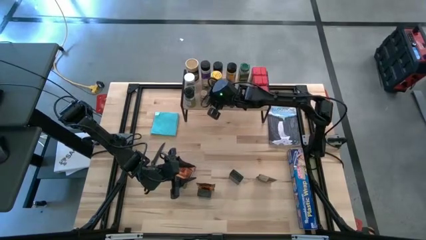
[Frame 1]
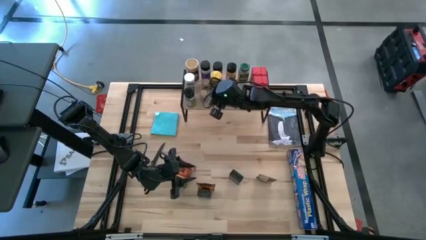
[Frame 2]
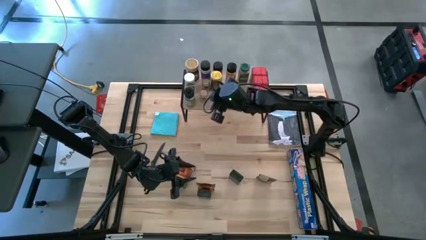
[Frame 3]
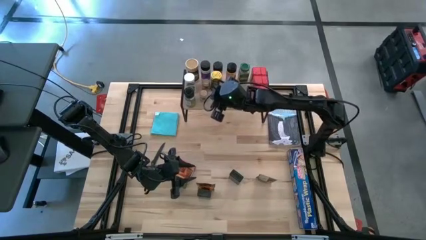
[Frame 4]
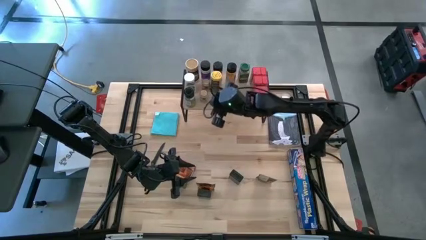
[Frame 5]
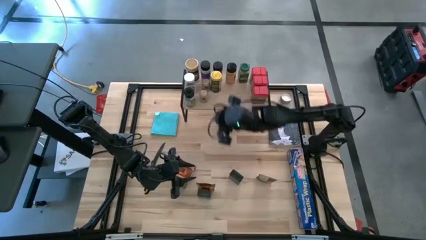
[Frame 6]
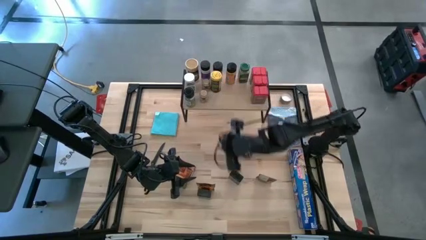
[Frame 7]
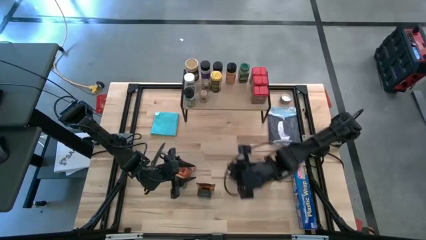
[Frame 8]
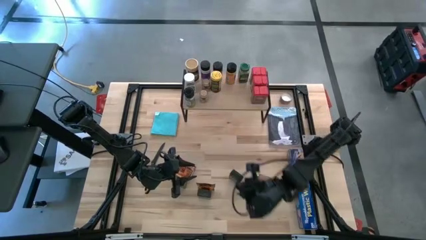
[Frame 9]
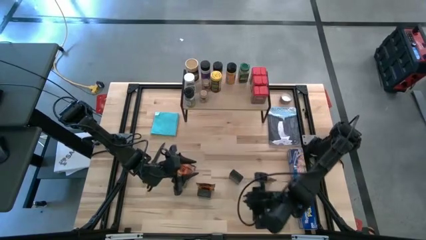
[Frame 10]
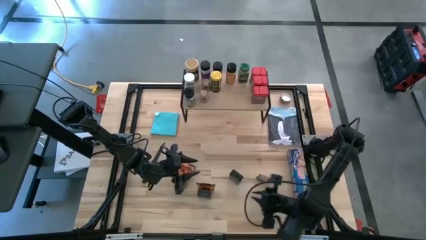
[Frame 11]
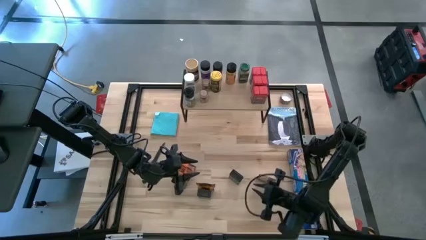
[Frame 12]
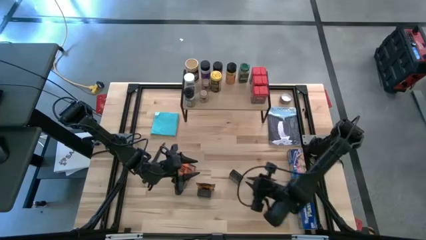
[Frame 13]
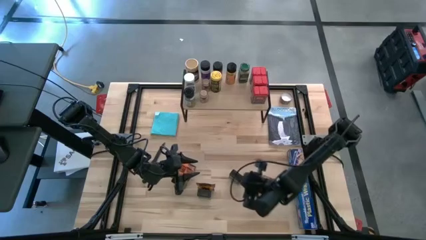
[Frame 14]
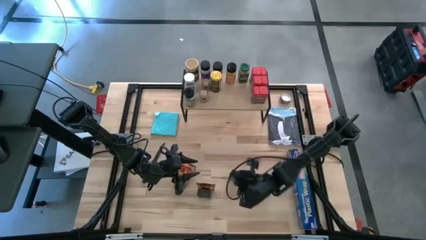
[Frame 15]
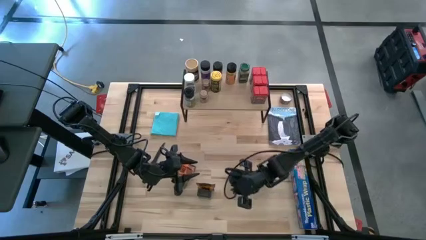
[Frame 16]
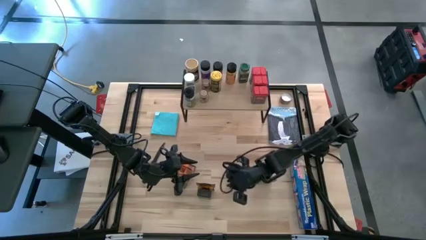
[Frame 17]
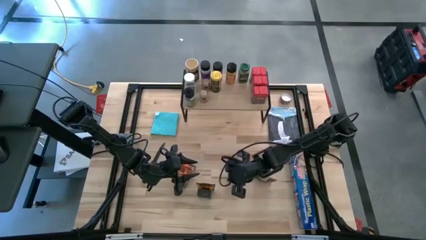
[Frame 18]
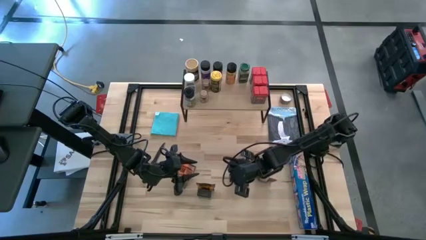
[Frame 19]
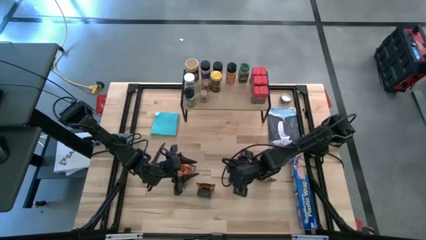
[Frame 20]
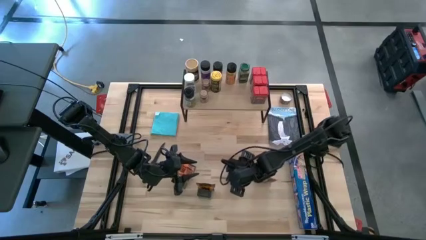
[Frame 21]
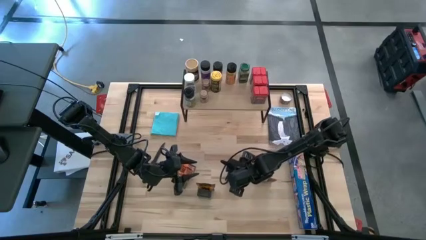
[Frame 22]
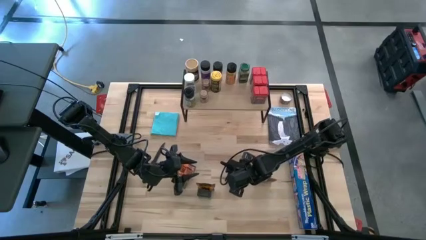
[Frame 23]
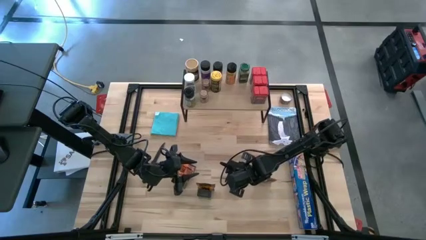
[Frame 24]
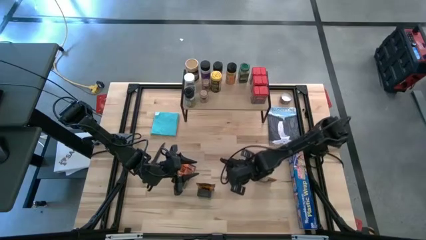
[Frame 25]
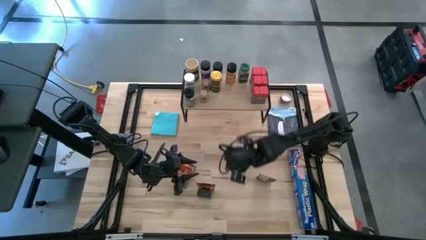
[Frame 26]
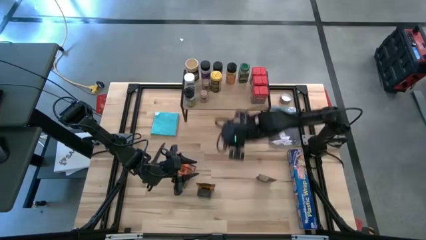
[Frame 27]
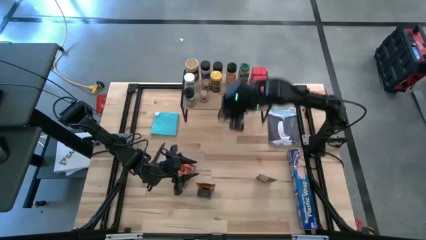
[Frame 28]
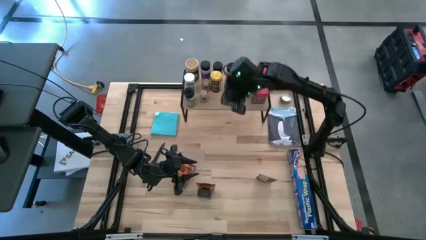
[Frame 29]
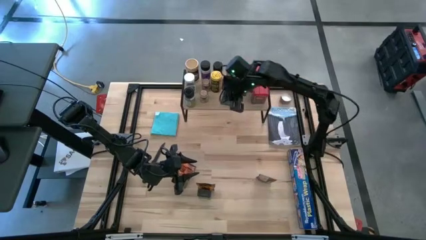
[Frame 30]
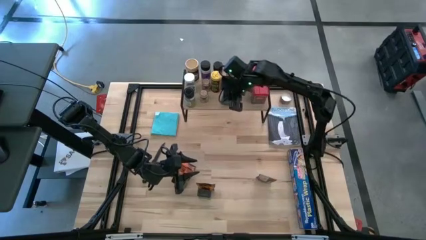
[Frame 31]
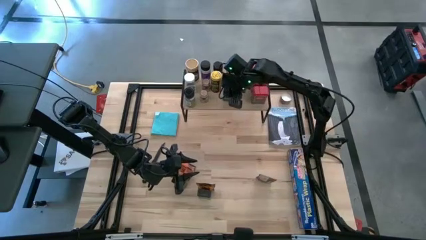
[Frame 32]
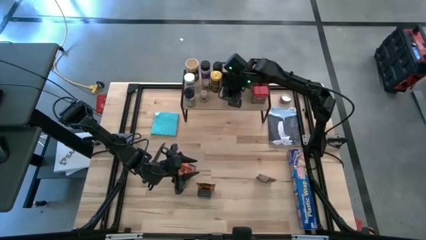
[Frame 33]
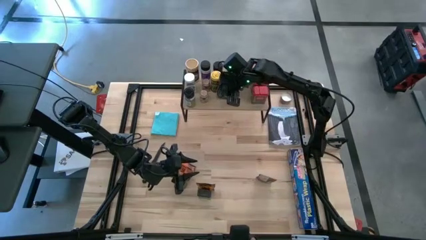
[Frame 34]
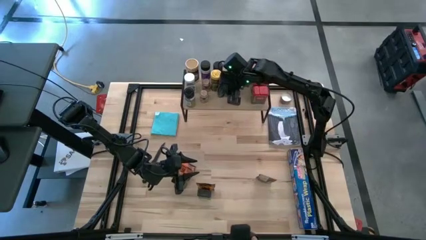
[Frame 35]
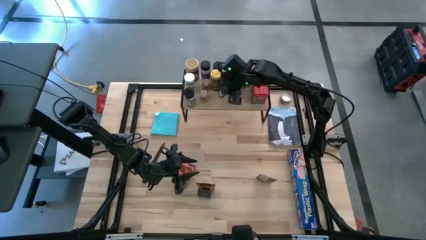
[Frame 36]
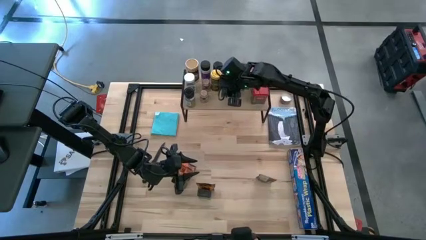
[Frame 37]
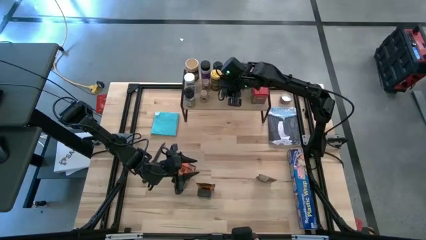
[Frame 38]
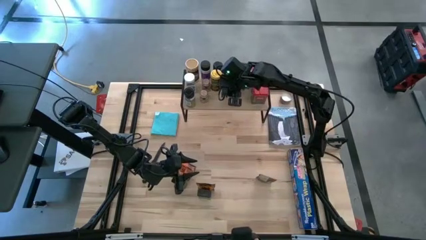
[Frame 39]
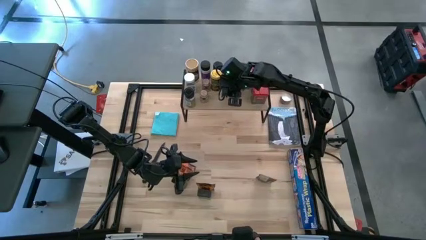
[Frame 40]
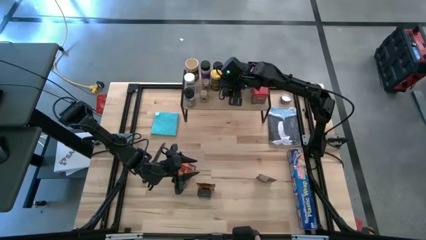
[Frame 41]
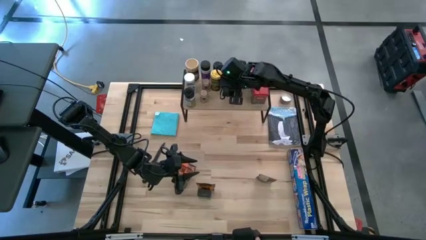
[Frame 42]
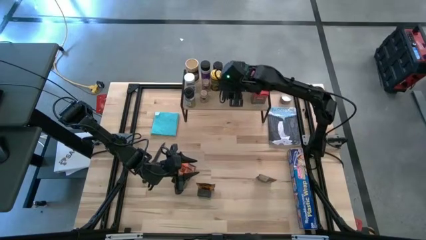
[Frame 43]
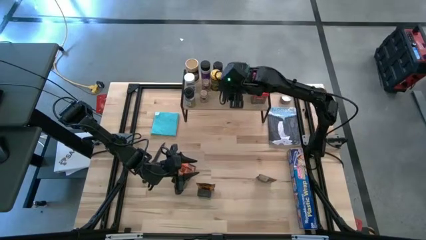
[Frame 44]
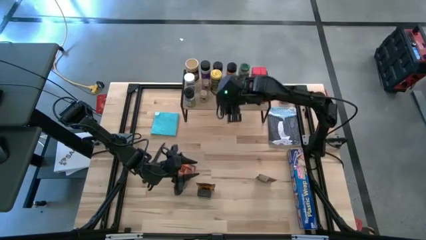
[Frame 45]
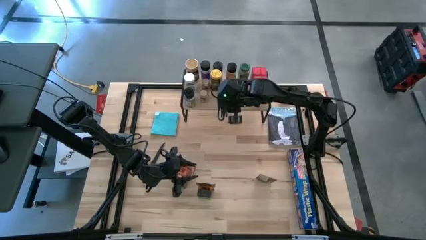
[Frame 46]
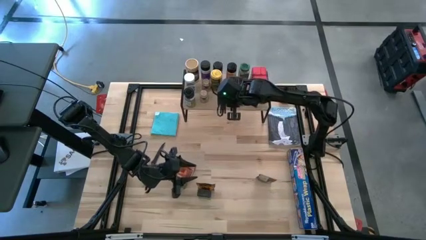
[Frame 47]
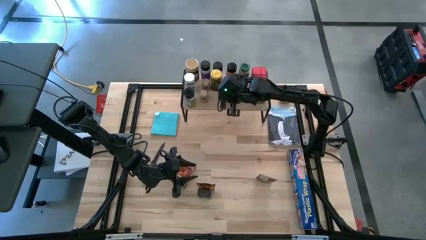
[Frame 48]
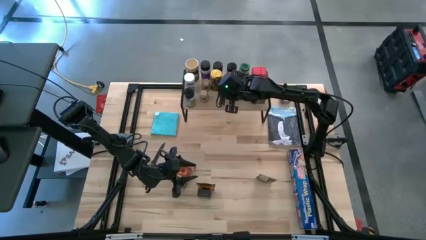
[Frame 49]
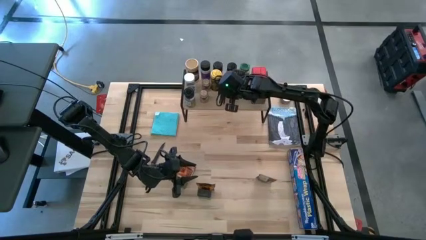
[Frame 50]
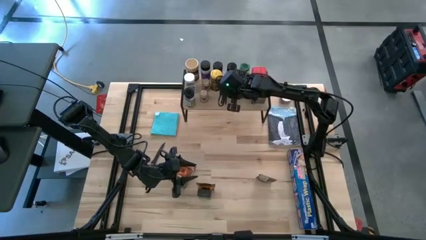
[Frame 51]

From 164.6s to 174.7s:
Task: Shelf spices
Put the black seasoning can on the shelf

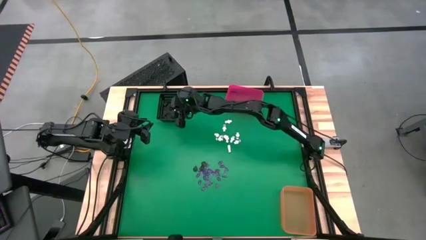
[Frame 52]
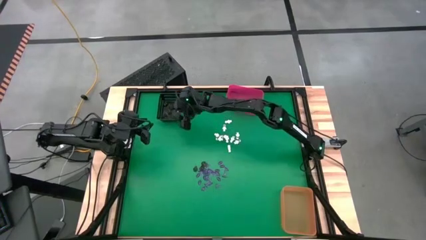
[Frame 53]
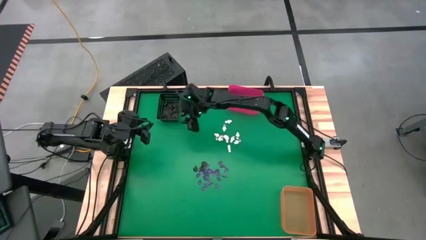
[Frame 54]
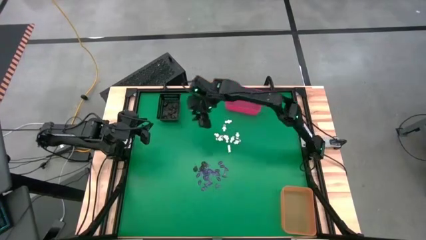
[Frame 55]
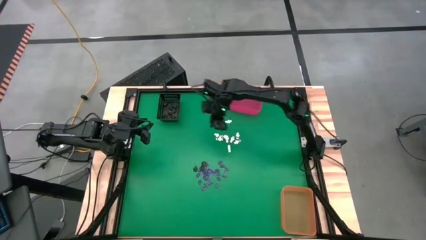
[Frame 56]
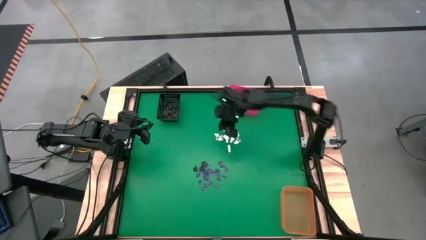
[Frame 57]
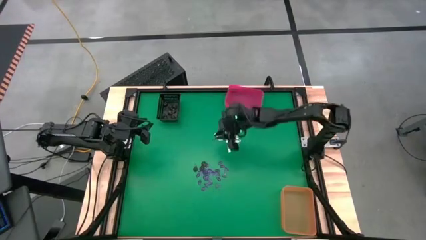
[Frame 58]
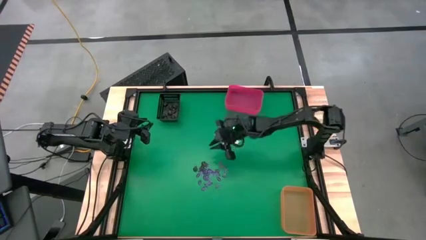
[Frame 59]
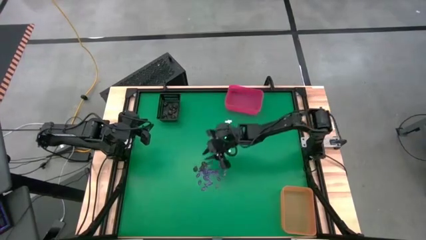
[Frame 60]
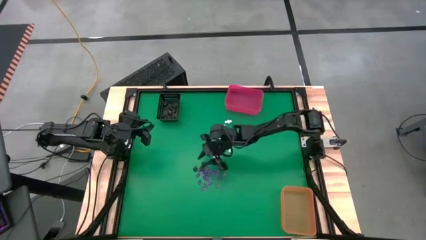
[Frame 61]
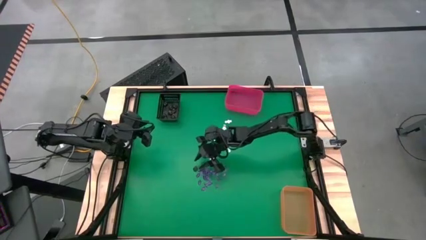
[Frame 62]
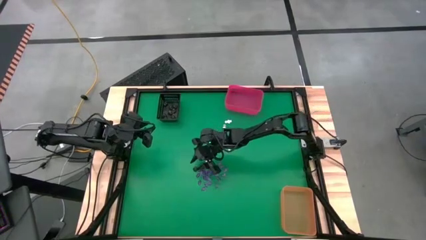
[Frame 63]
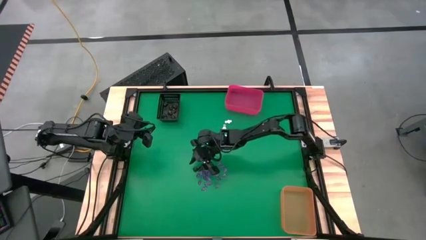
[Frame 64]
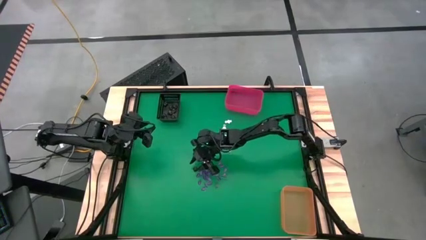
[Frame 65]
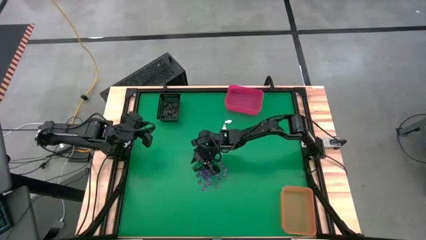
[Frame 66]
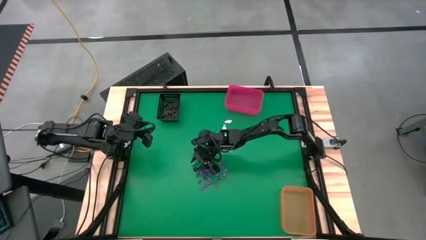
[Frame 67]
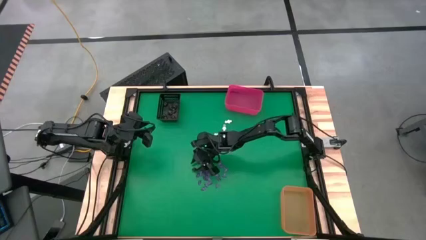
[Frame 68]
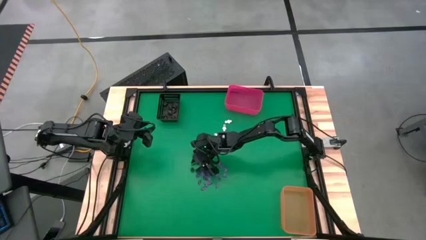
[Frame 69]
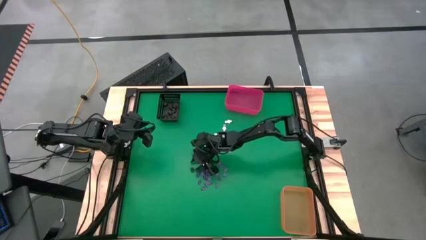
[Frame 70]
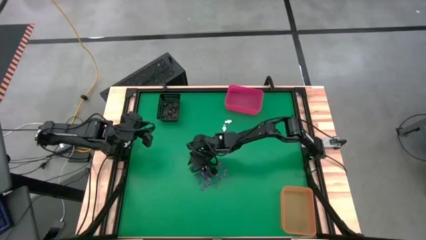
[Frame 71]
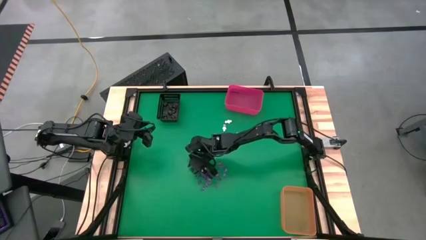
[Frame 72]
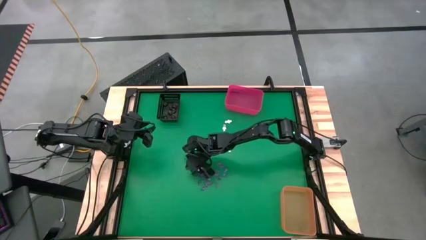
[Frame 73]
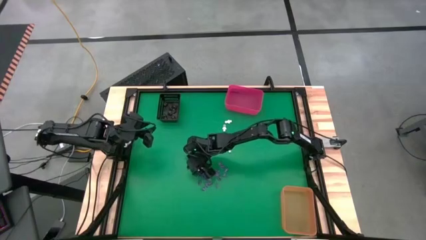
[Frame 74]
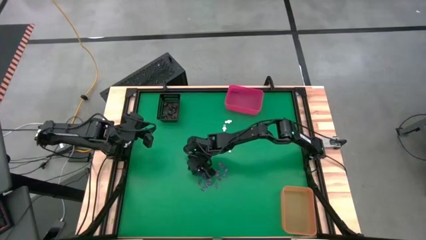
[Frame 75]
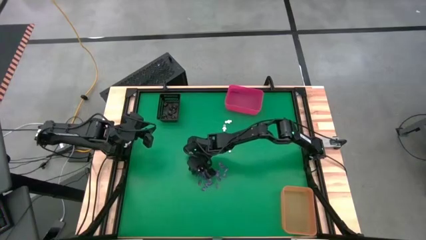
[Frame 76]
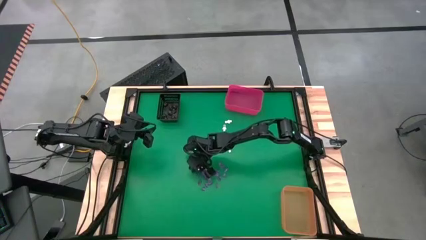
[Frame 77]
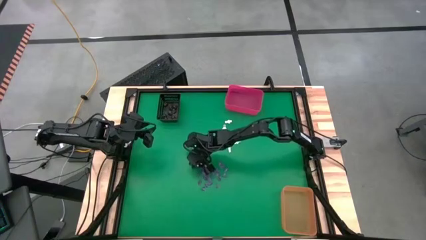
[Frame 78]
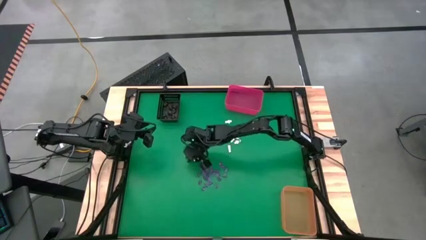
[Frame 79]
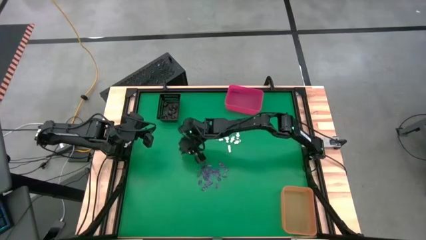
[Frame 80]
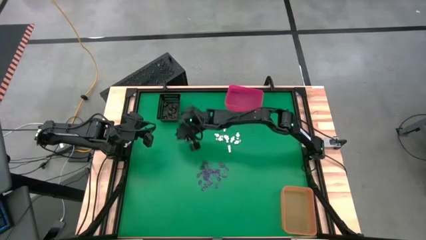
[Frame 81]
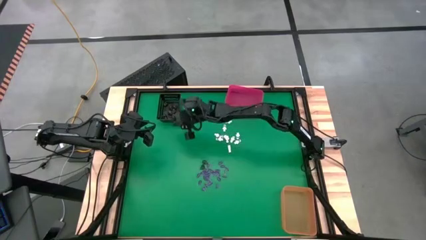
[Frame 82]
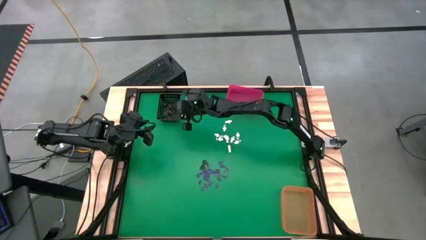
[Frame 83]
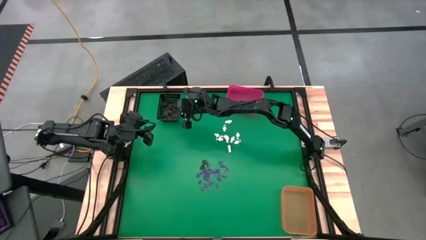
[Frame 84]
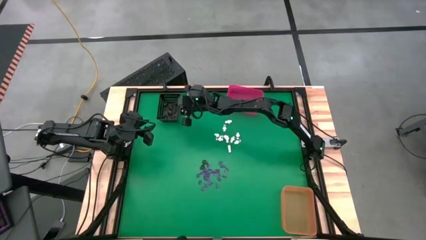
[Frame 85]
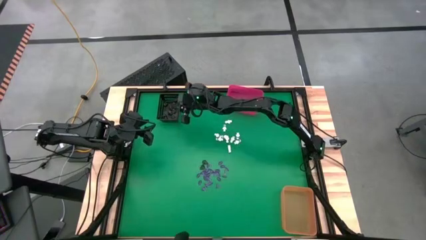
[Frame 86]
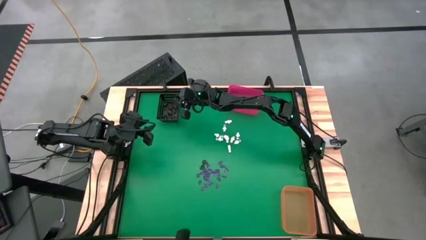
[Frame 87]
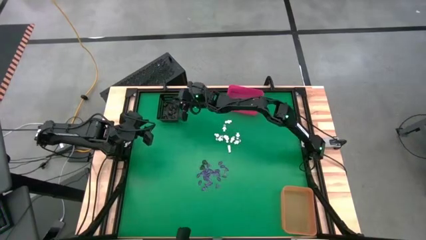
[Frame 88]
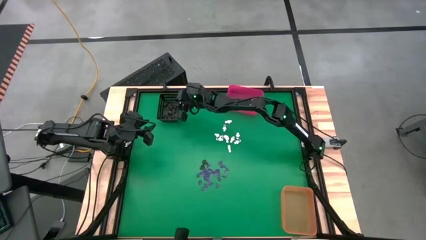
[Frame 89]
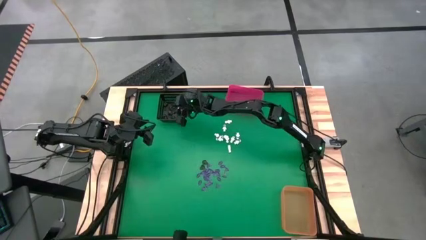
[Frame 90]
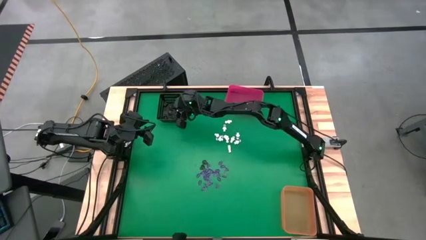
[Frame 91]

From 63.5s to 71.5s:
Task: Sort Halloween decoration
Put the brown skull toy into the black bin
